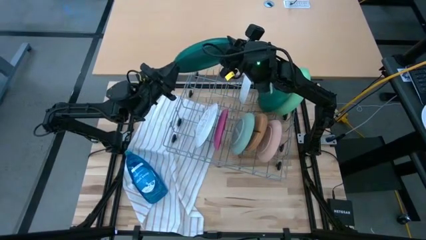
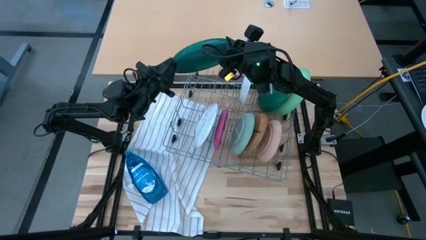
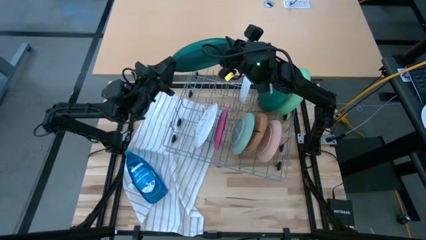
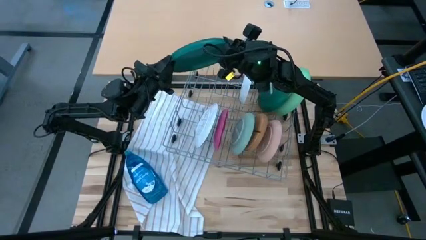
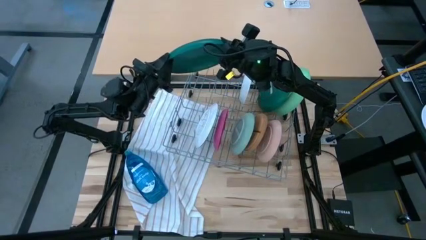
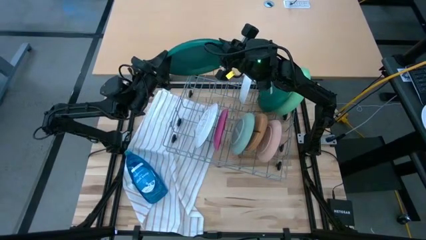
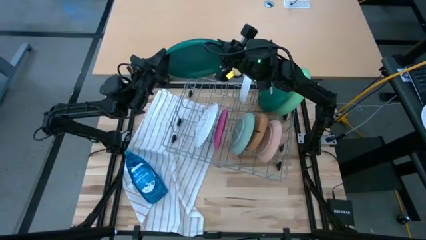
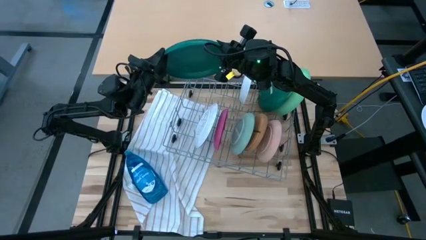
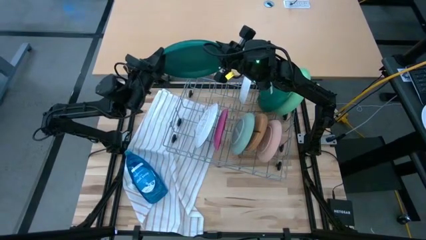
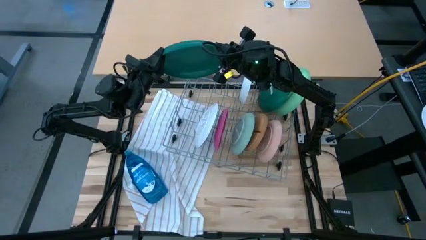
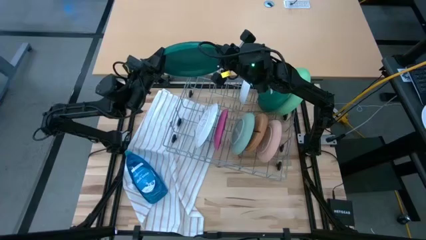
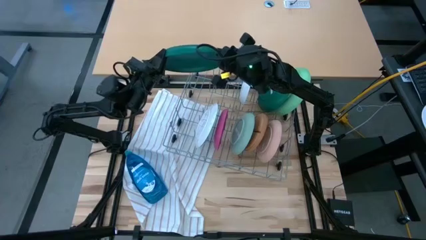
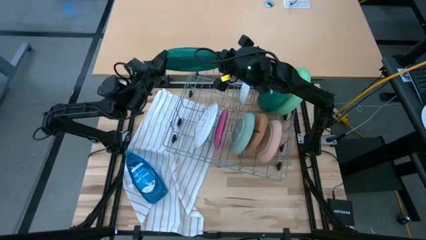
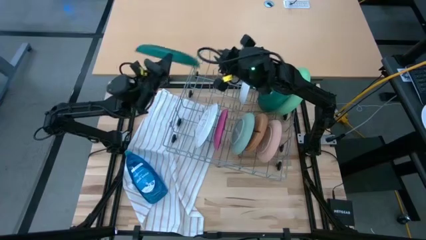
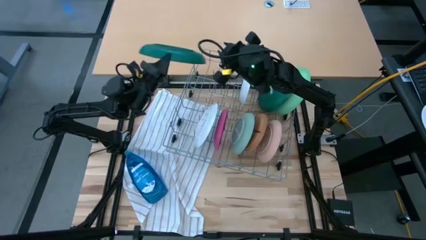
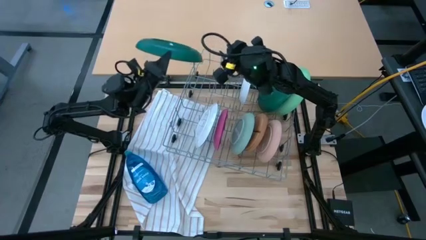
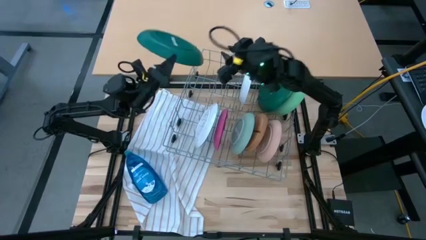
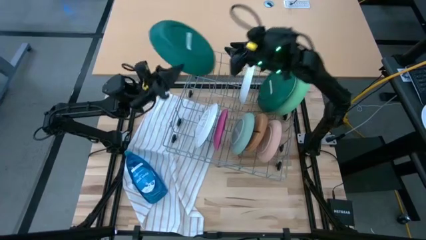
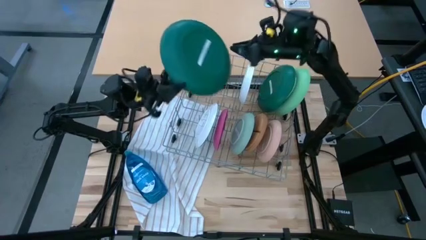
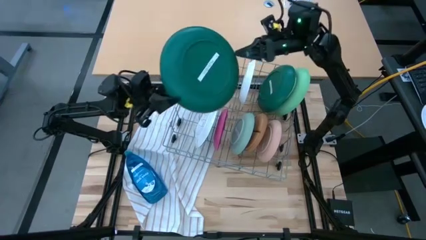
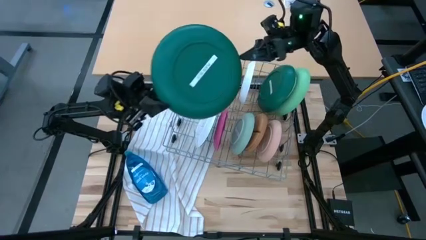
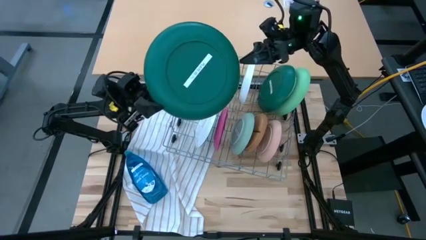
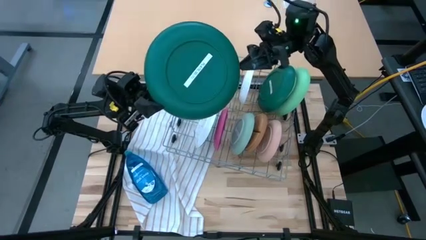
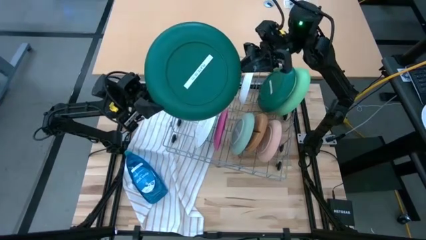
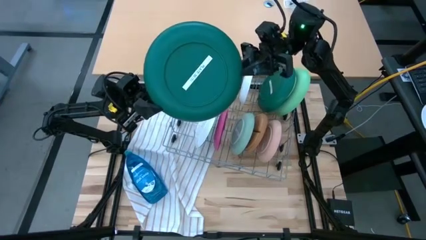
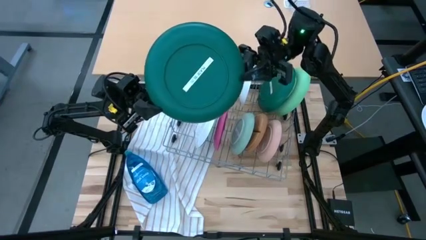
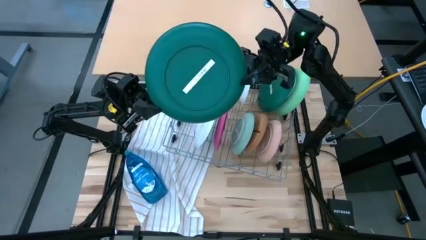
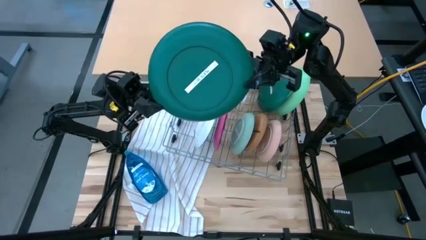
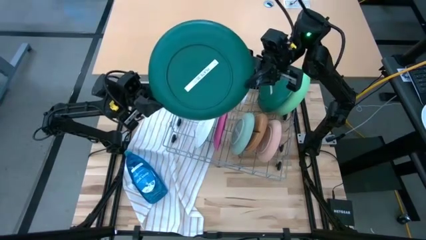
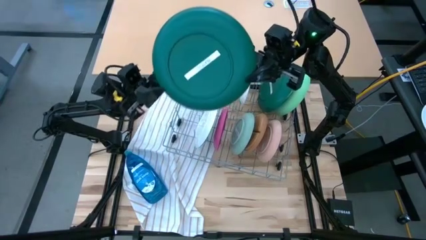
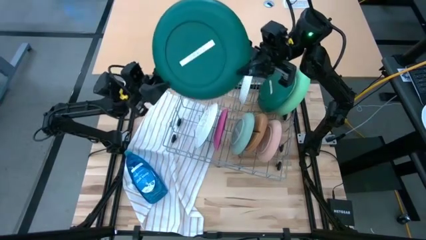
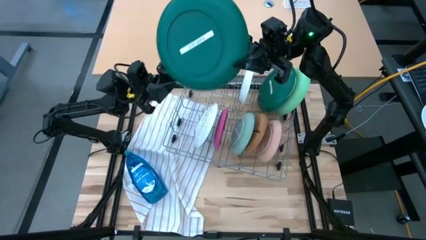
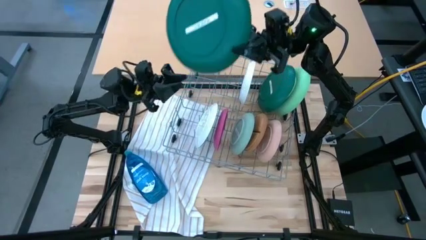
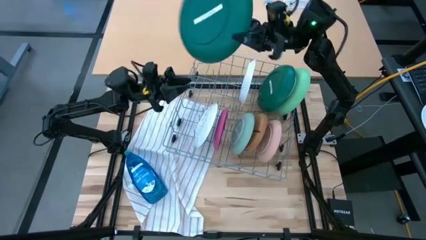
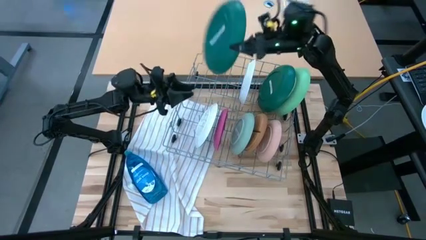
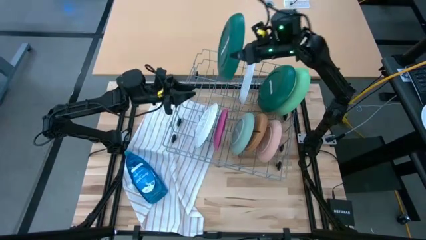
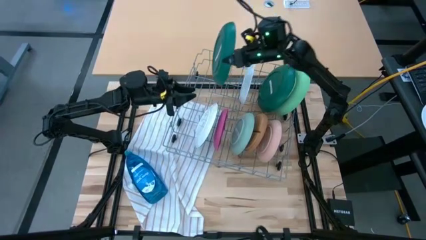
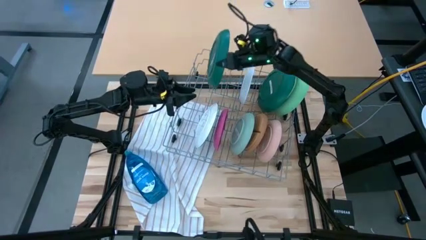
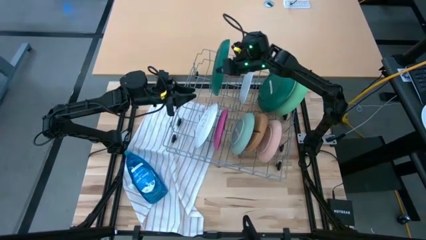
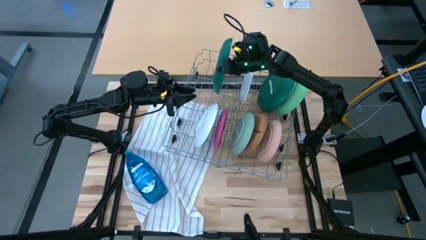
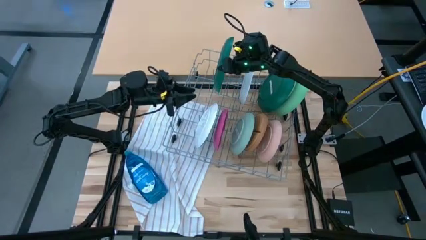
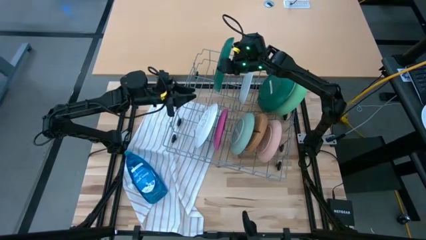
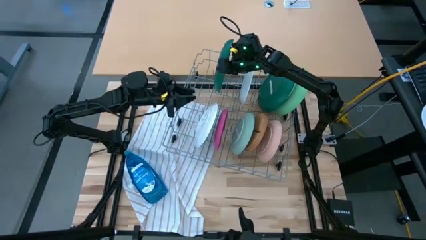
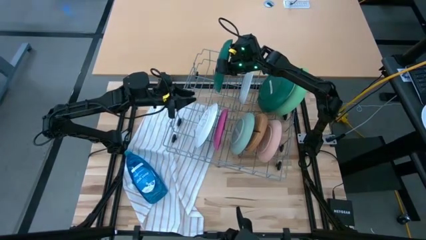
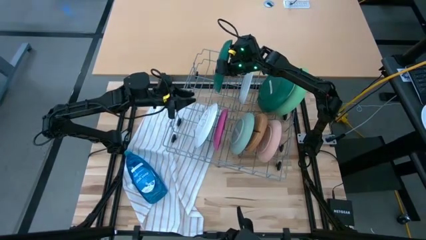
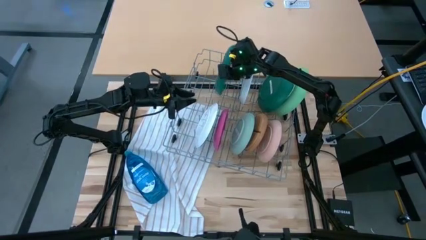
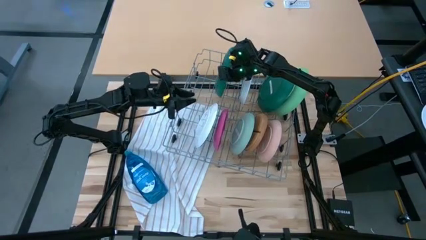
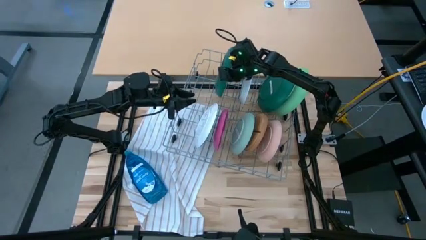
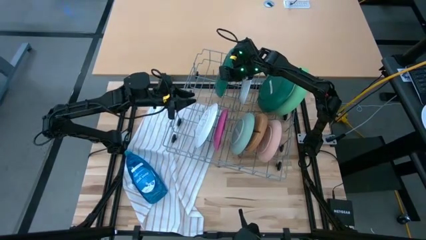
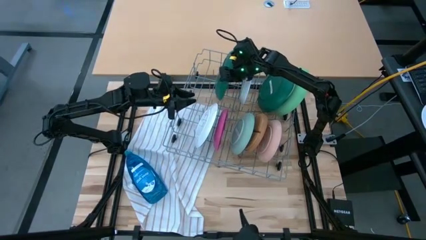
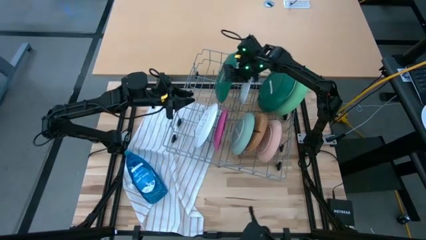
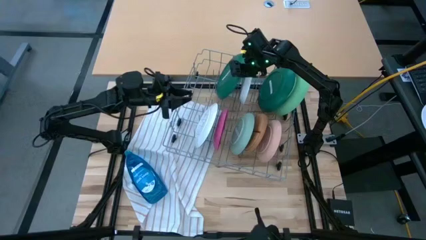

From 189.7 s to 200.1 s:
Task: Sort dishes
Put the dark green plate in the dish rack

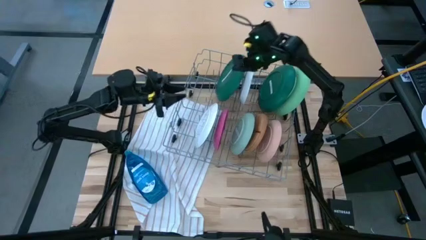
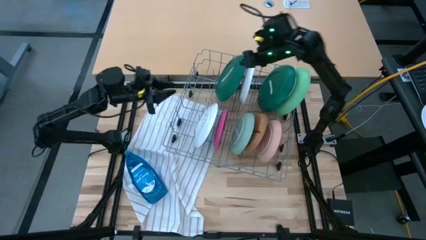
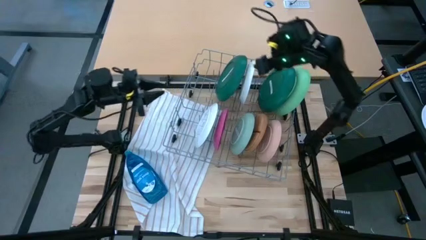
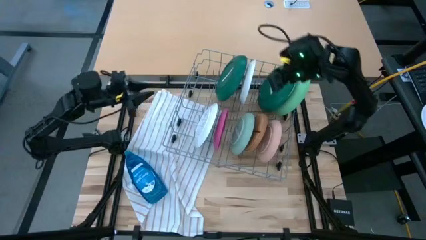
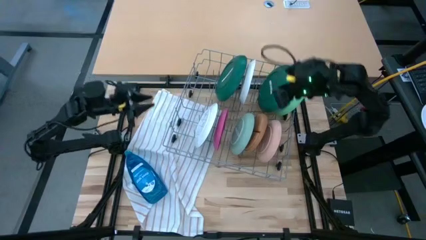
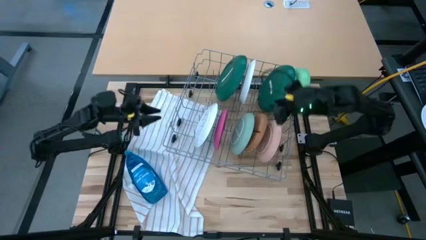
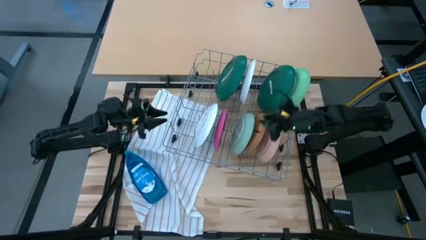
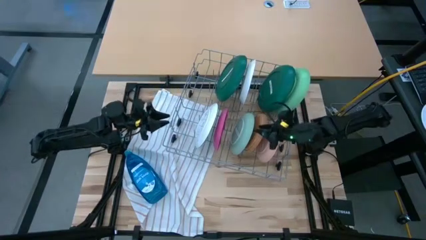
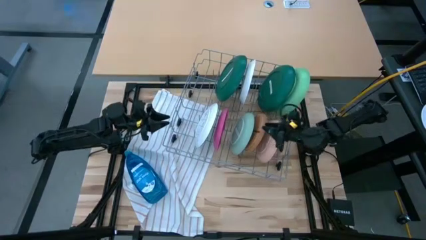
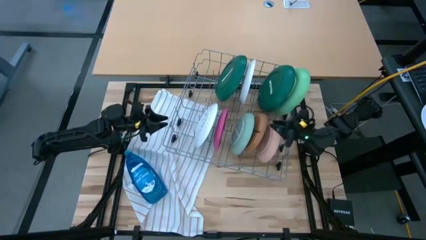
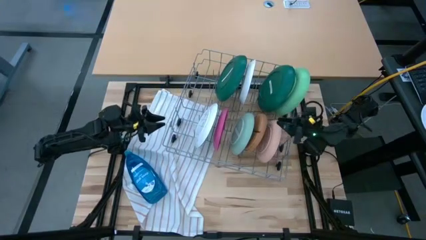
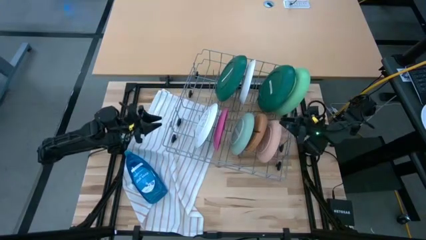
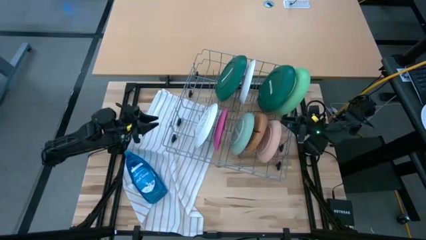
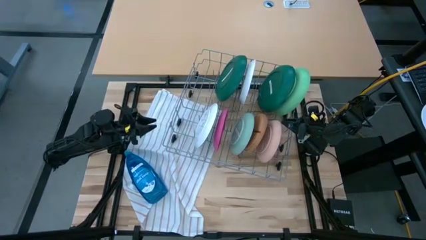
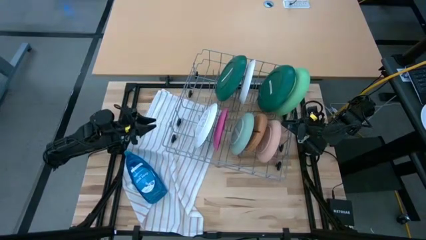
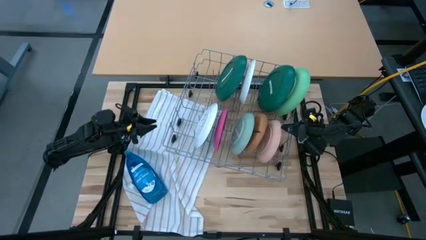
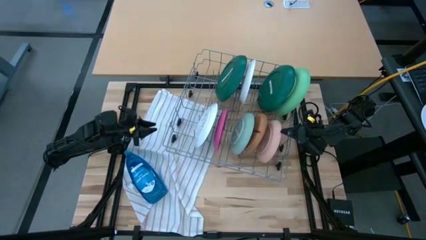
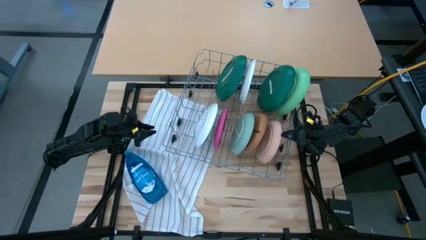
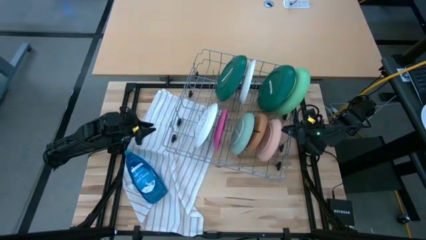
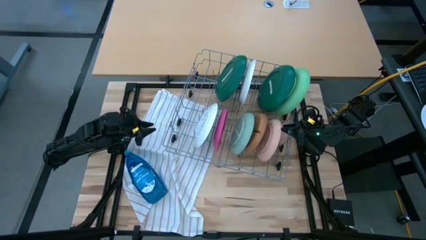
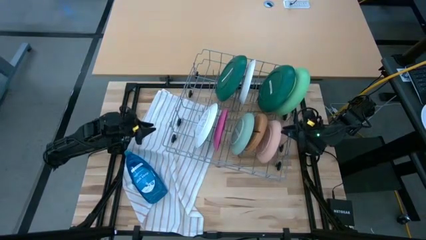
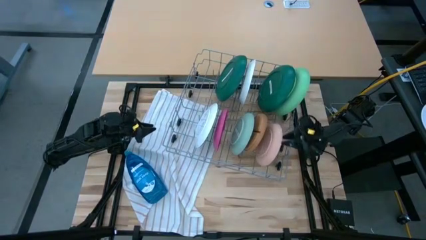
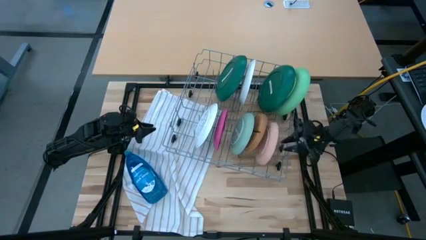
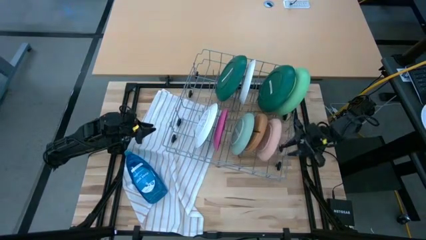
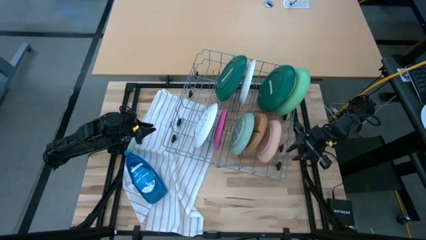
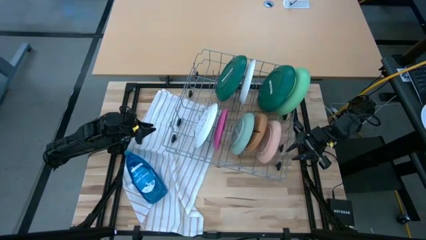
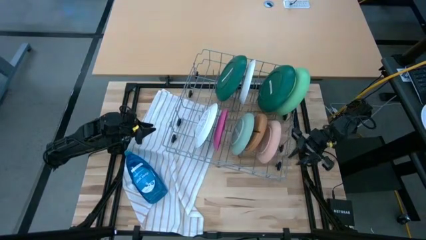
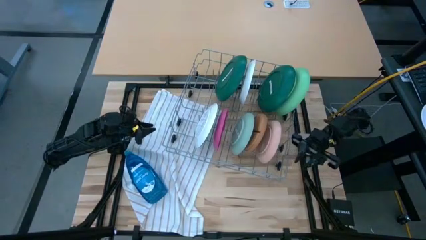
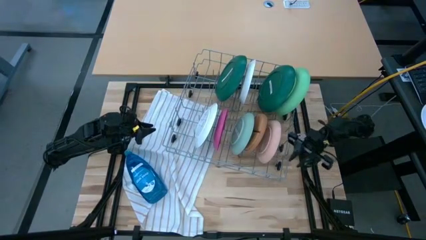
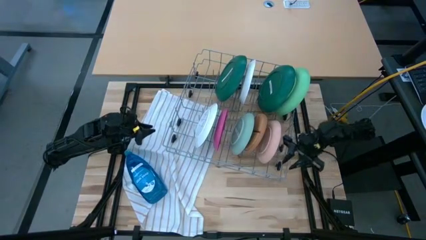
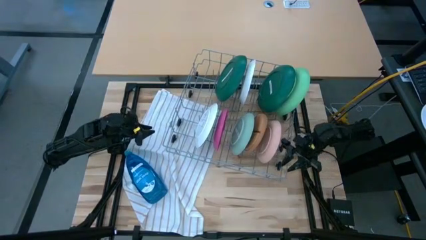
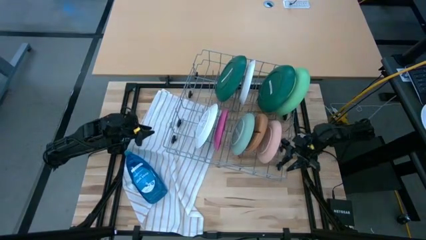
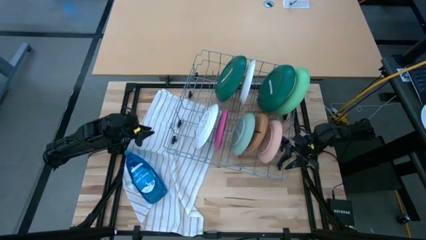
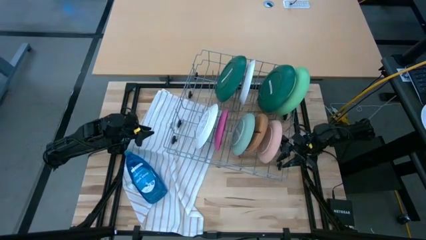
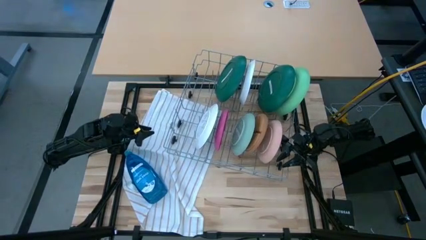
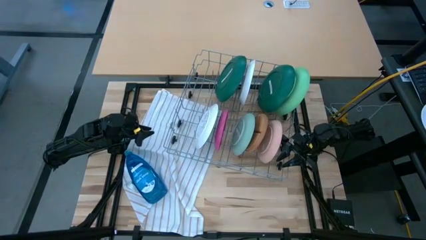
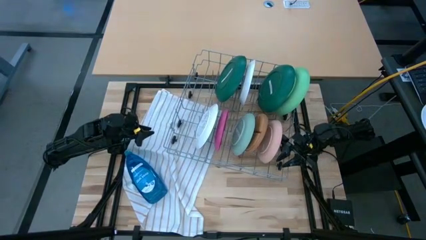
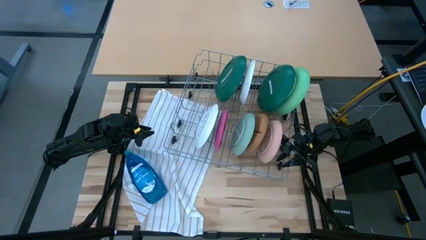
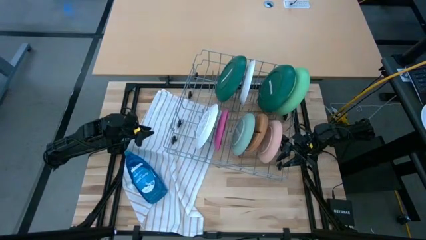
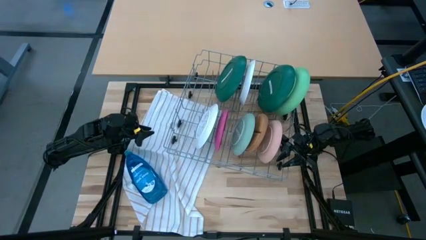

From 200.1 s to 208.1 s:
Return to Home Position
